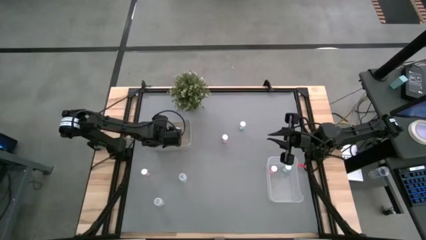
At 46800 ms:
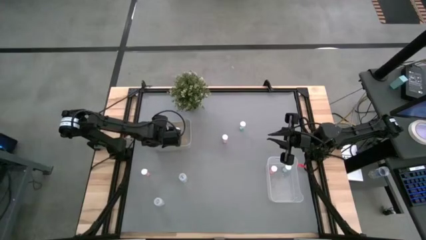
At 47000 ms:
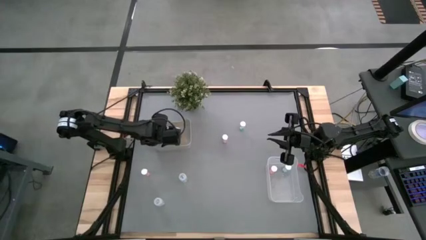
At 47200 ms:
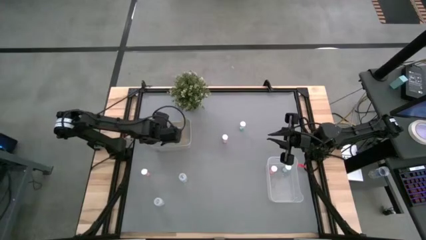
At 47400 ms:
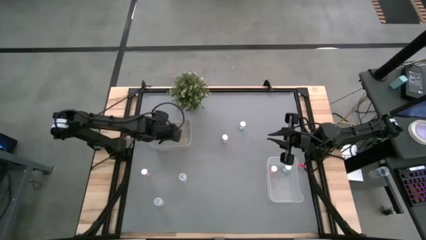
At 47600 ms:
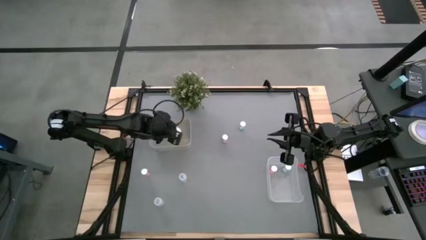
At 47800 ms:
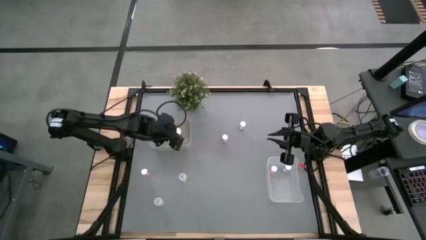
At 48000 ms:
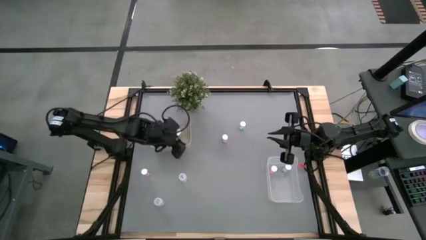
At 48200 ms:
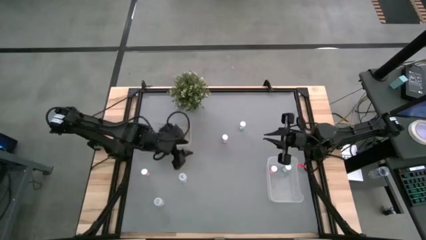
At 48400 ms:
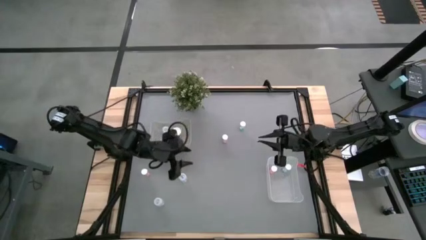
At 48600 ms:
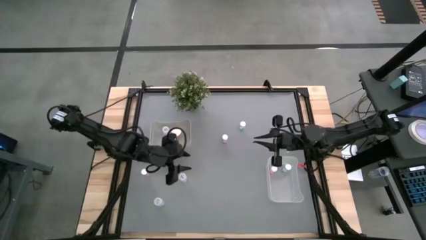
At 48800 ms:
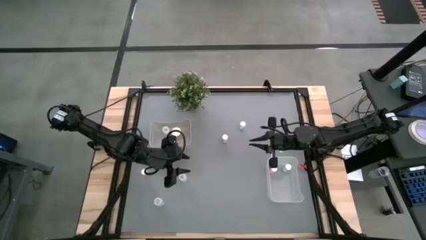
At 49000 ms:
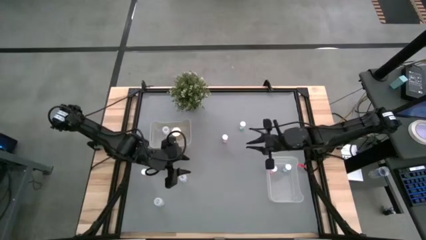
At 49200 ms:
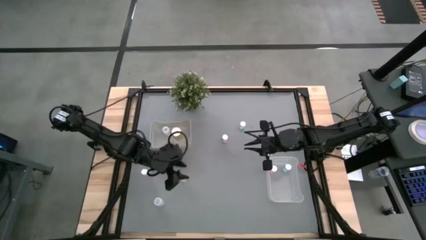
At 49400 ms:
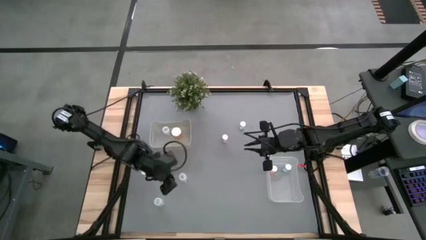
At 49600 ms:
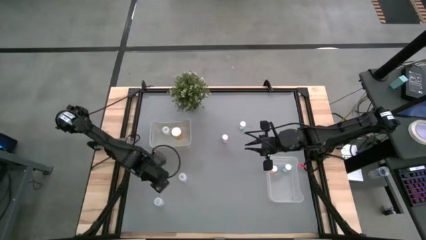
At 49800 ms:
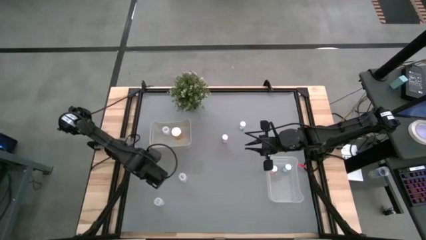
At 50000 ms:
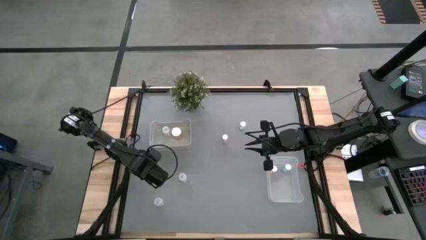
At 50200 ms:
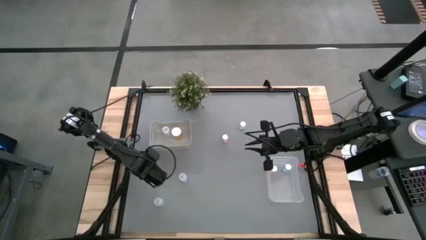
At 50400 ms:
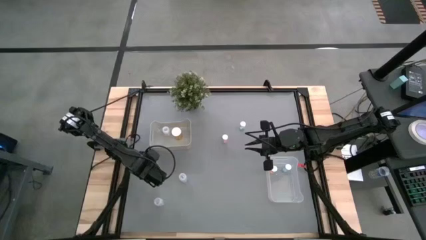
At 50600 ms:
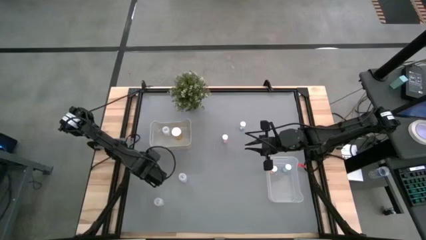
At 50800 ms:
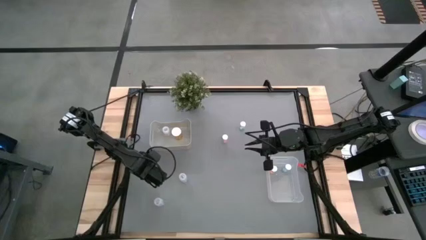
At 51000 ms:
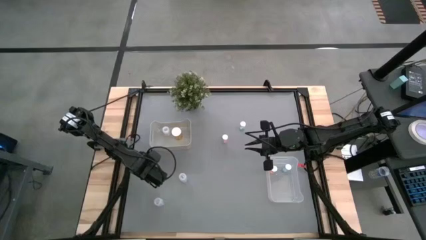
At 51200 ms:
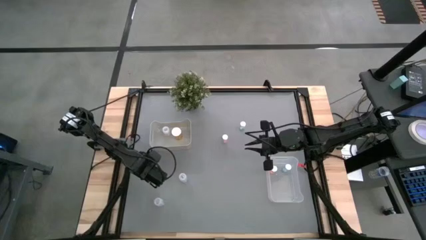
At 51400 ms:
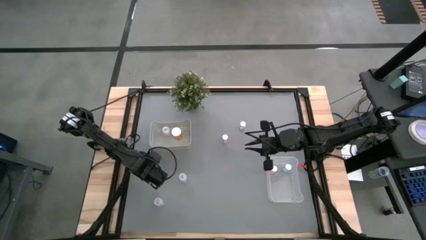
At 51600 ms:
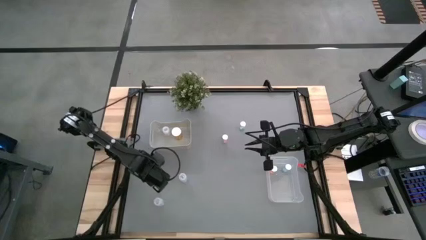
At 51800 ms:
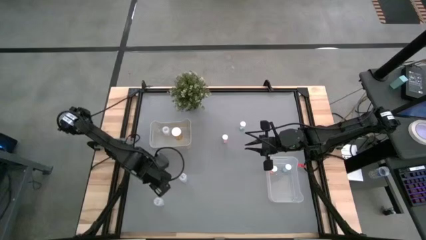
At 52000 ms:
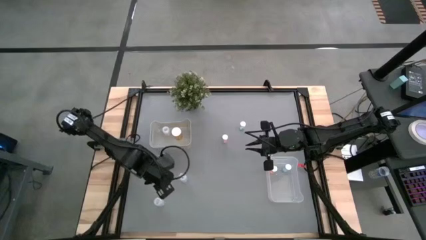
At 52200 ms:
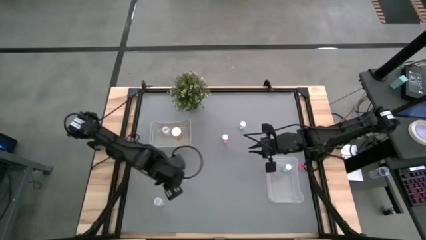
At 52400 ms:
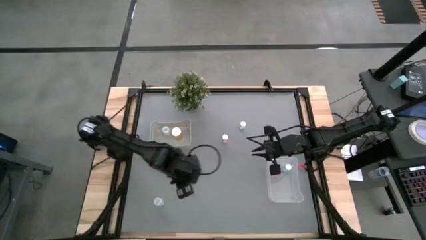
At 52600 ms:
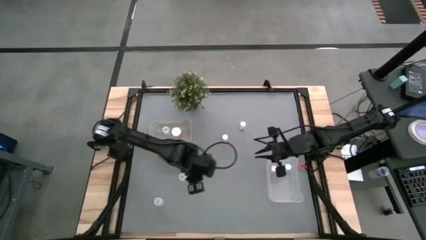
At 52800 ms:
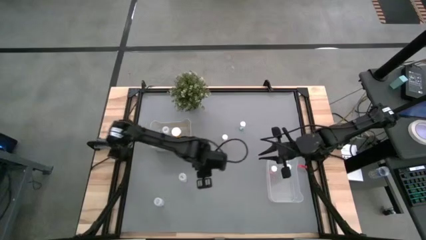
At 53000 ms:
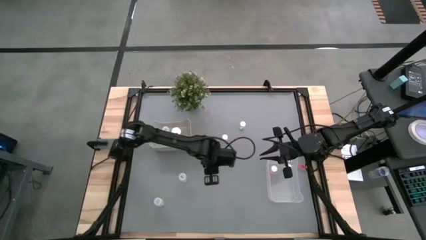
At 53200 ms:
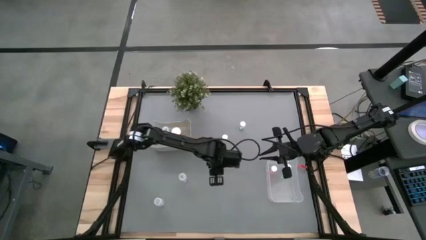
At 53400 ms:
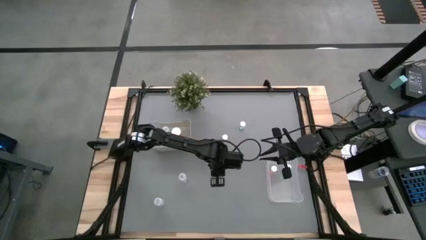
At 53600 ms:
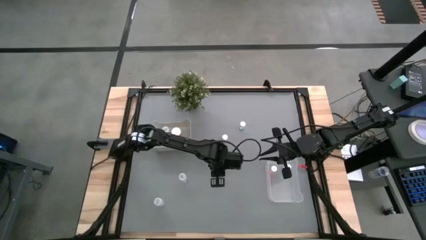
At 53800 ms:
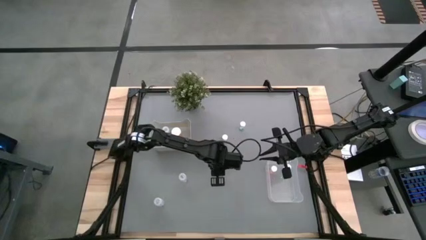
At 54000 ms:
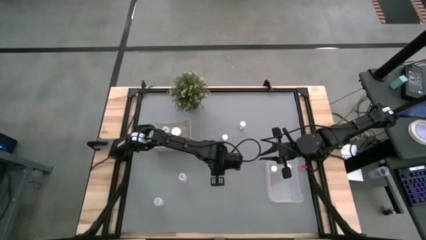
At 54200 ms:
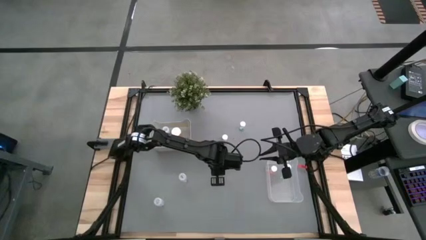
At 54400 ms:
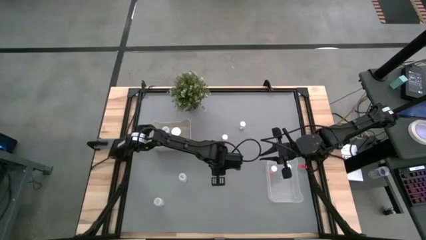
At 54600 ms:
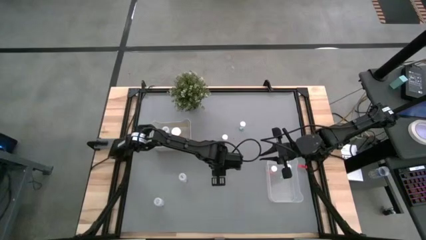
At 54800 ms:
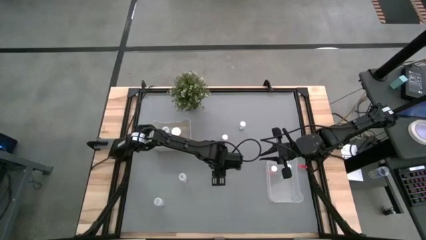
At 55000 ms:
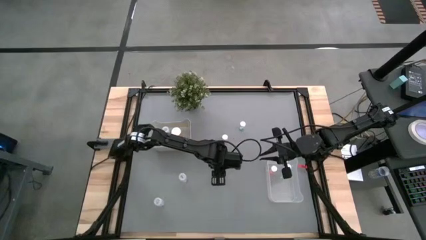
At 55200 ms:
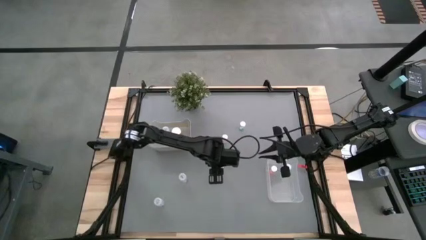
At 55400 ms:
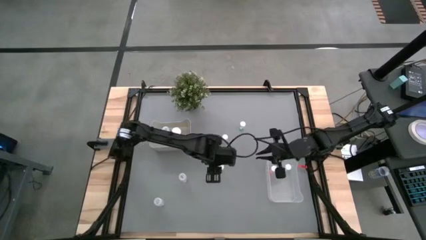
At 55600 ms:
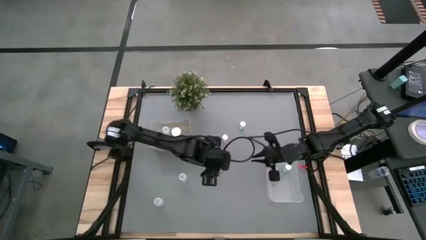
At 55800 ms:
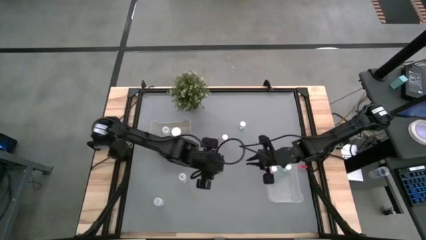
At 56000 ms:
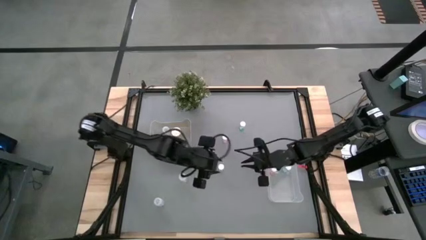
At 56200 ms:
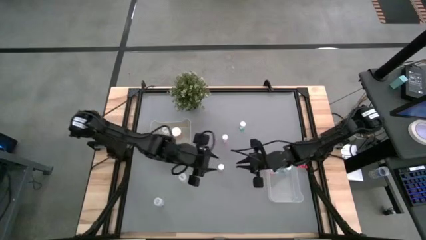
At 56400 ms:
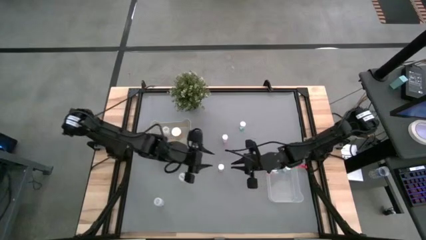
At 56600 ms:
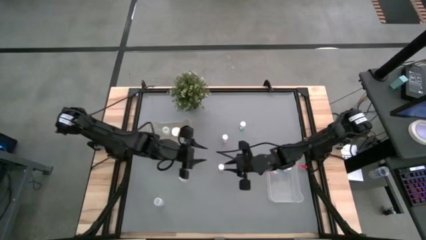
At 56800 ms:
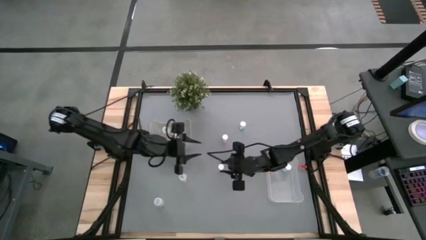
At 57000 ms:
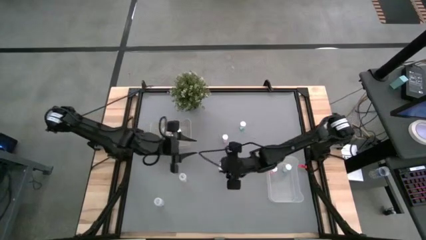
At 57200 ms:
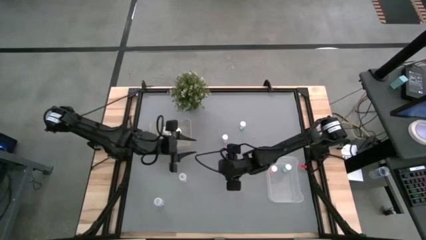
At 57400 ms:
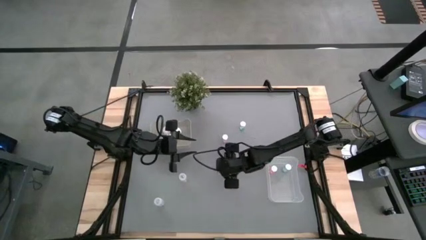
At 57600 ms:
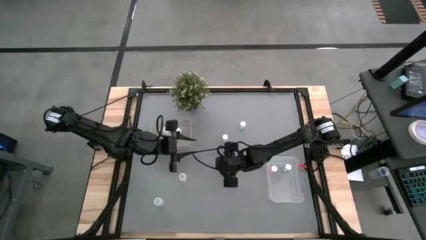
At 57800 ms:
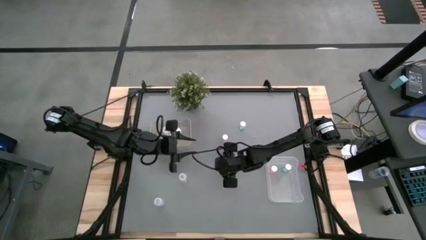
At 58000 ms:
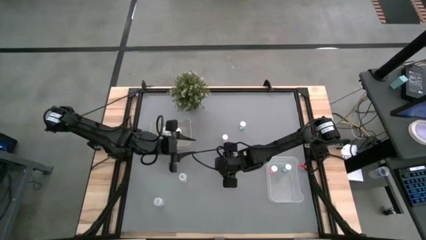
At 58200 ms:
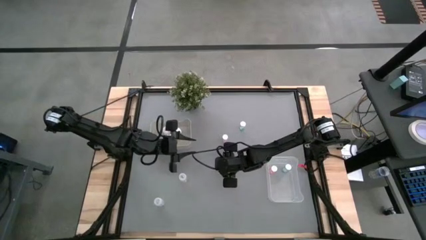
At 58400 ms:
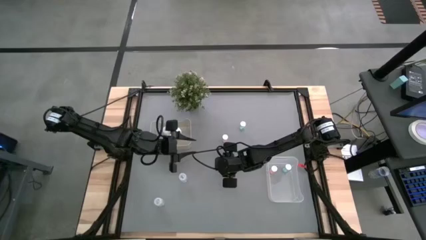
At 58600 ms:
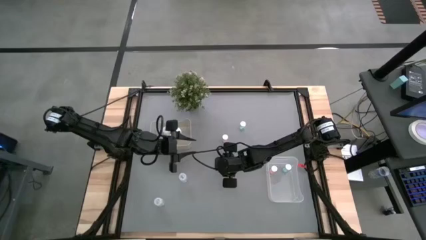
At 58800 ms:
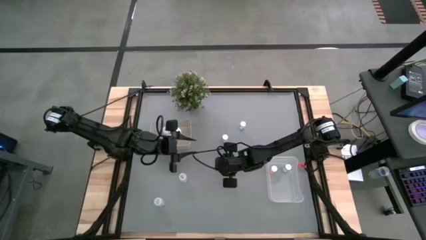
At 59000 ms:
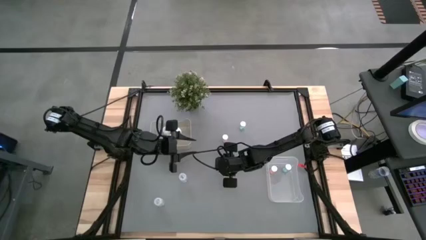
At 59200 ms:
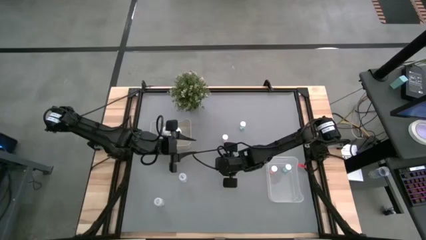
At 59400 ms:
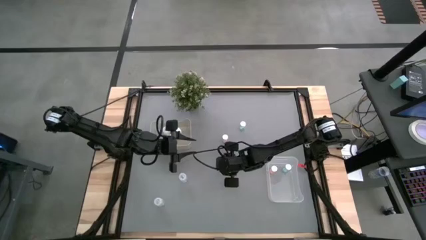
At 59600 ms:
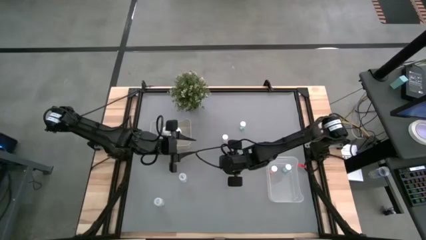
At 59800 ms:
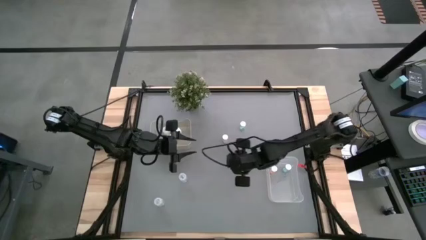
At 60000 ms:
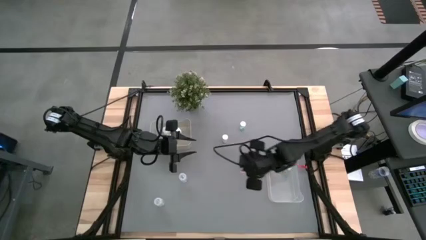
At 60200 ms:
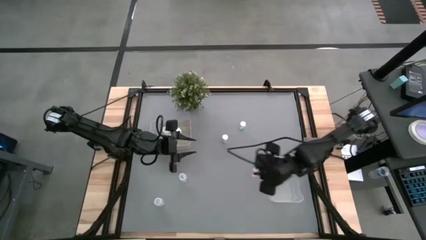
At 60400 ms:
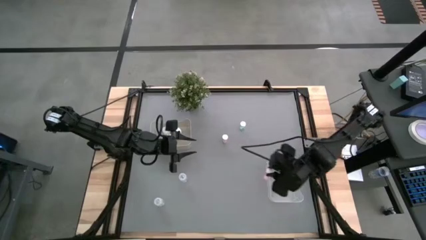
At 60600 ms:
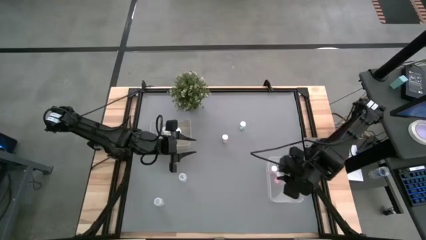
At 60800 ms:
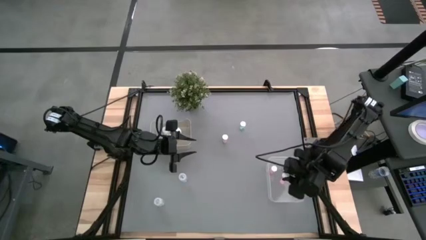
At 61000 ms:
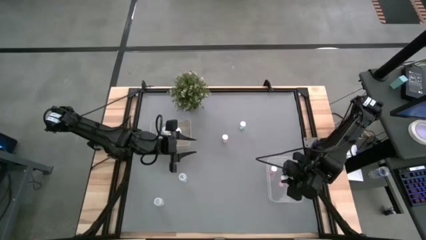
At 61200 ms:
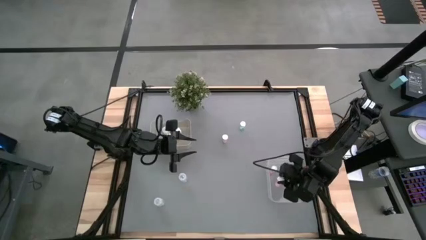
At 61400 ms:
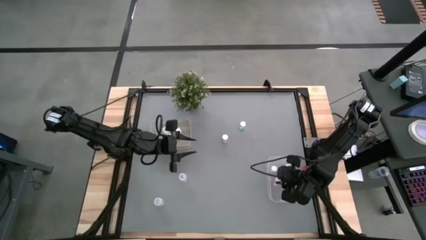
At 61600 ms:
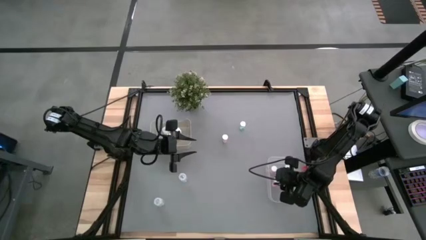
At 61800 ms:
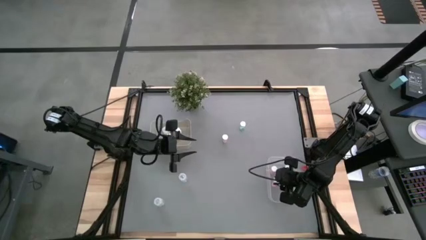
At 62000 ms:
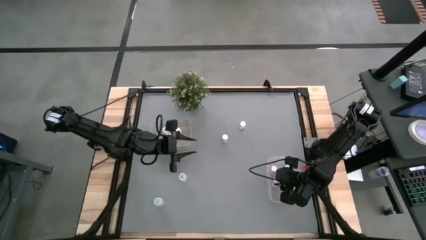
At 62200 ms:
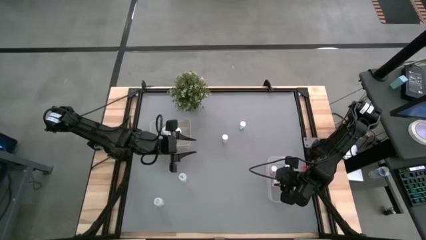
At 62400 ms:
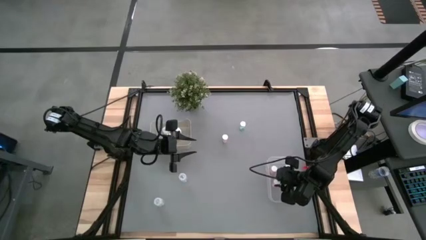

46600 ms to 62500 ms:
Task: Pick and place medicine bottles into bin by pill shape (circle, oval)
Put the bottom pink pill bottle into the transparent bin

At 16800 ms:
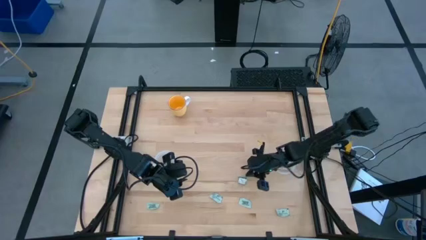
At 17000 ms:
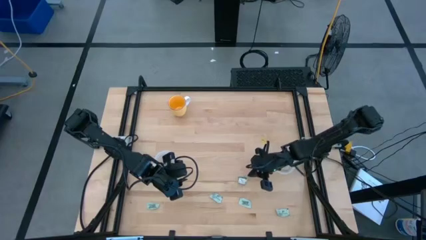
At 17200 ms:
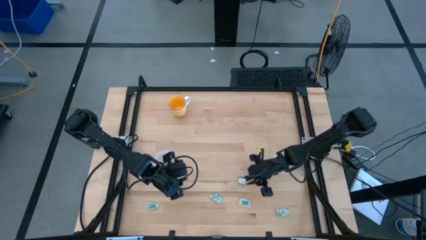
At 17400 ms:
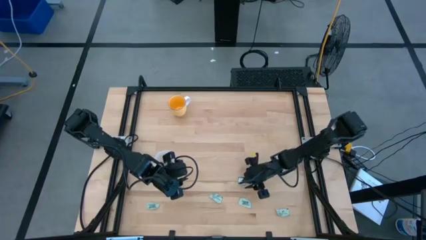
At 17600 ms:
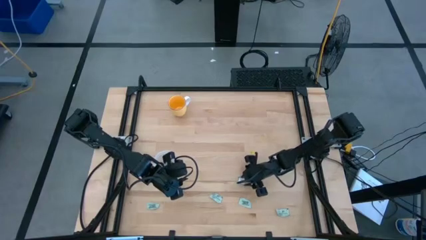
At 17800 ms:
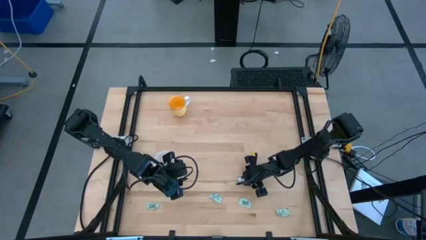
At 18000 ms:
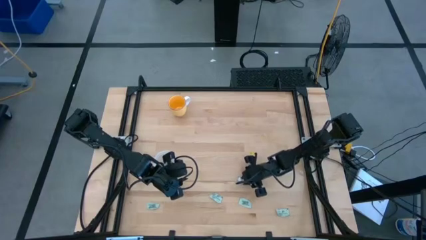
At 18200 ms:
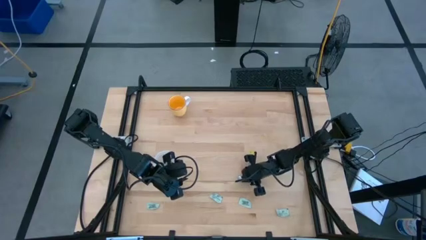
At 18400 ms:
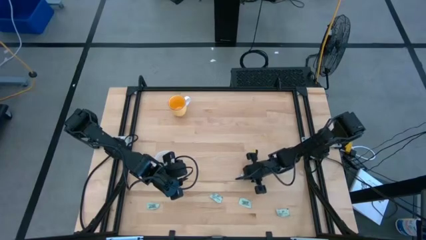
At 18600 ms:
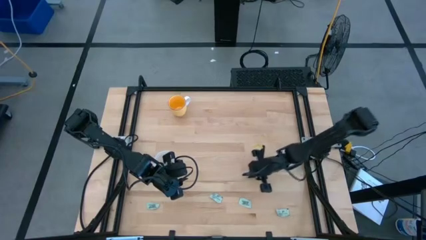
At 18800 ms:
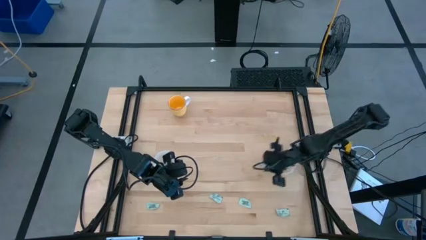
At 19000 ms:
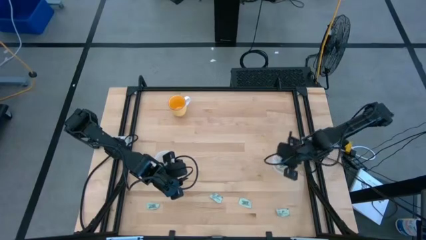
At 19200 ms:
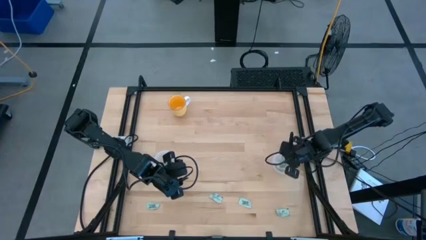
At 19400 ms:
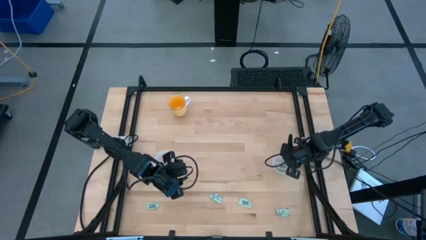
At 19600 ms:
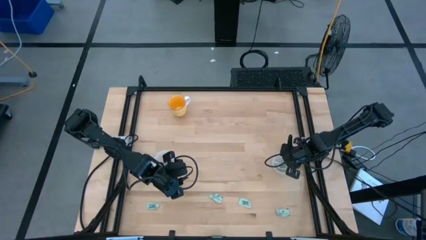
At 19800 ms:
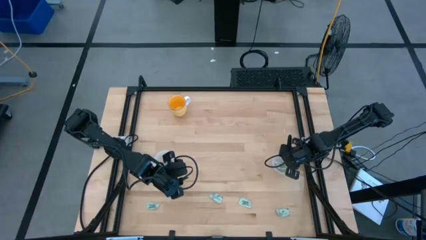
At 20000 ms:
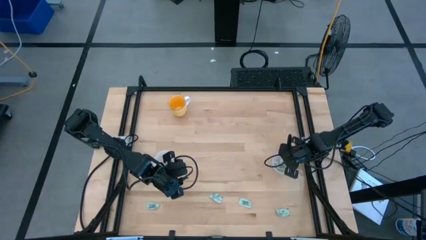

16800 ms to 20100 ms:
Task: Pick and place items into bin
Put the truvia packet into the right transparent bin
